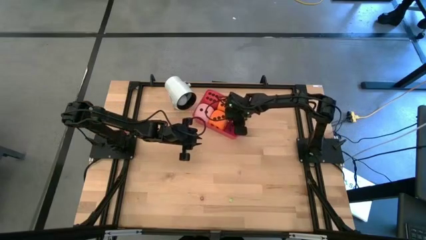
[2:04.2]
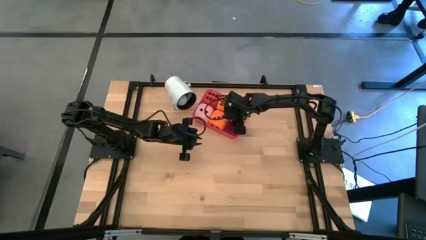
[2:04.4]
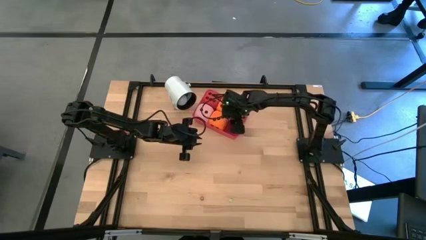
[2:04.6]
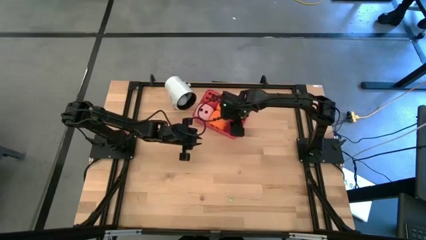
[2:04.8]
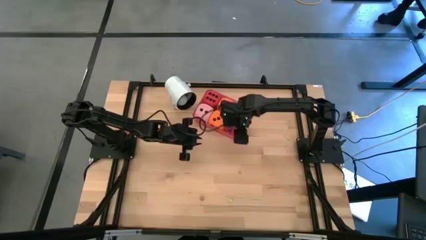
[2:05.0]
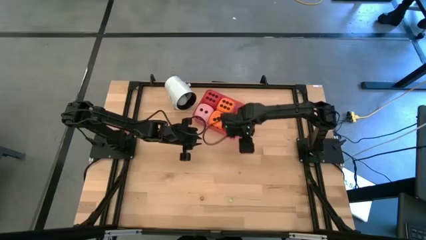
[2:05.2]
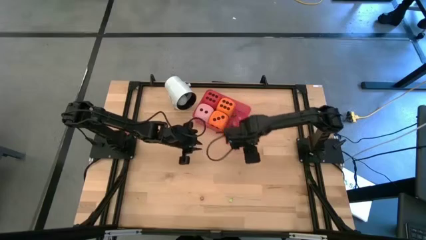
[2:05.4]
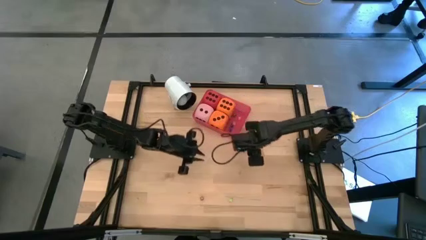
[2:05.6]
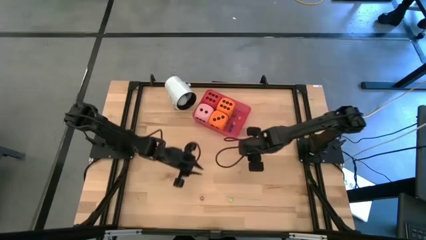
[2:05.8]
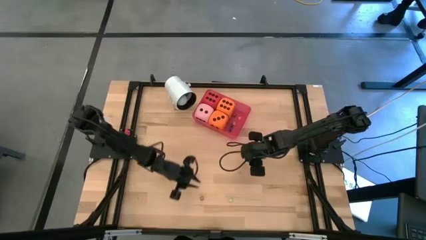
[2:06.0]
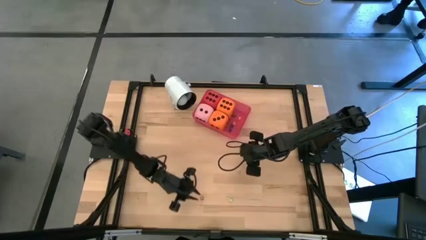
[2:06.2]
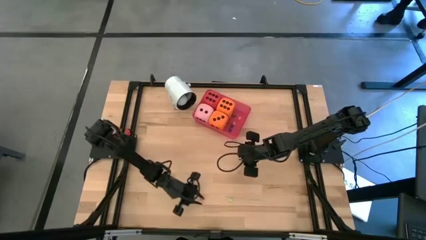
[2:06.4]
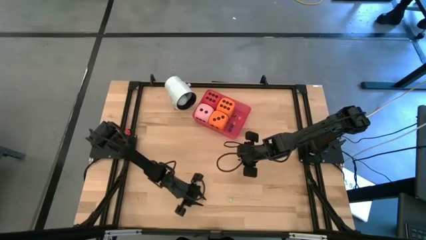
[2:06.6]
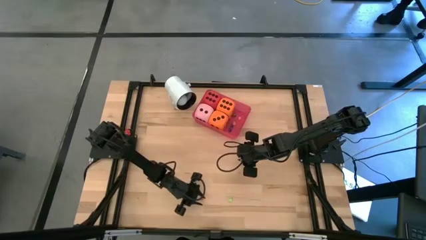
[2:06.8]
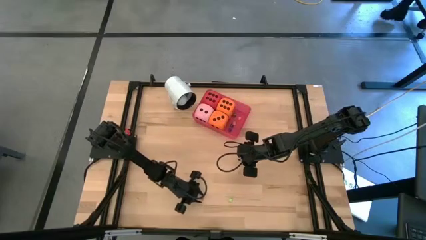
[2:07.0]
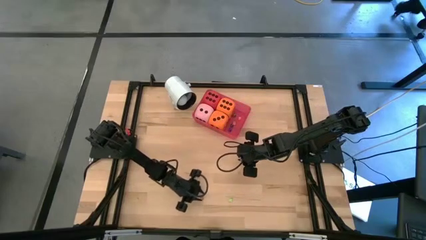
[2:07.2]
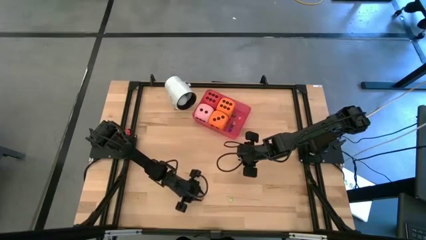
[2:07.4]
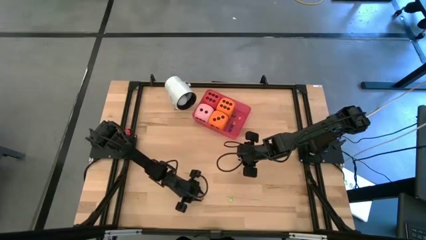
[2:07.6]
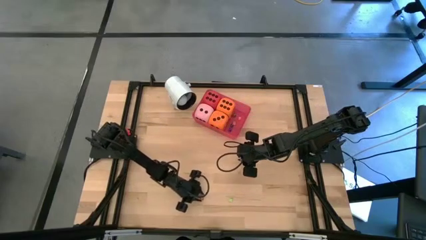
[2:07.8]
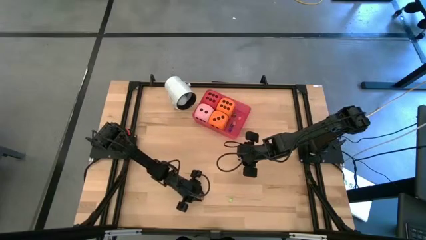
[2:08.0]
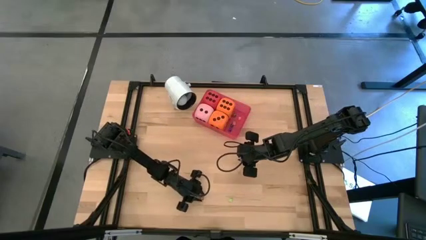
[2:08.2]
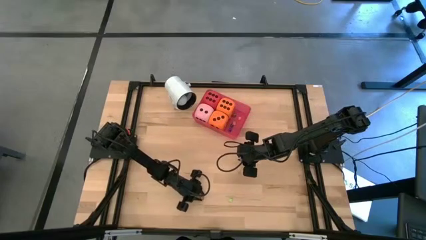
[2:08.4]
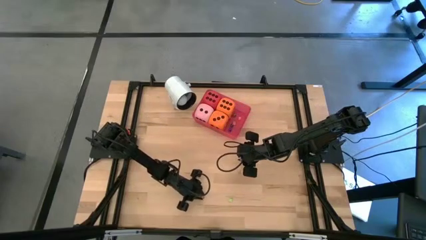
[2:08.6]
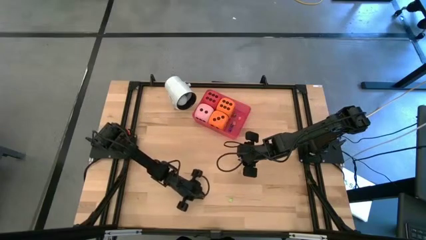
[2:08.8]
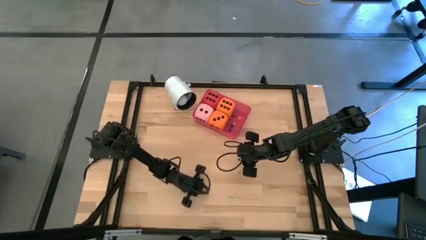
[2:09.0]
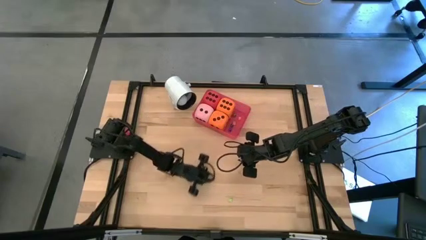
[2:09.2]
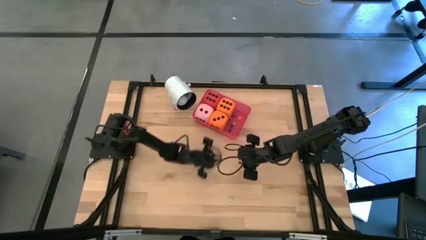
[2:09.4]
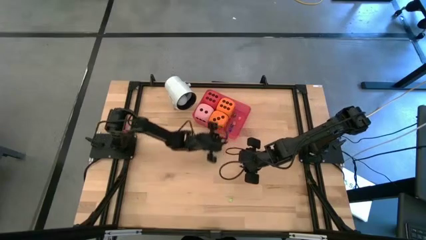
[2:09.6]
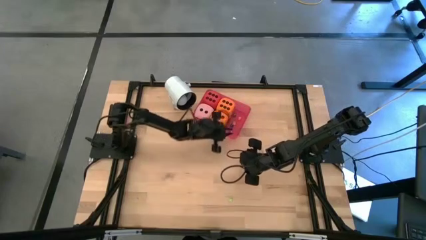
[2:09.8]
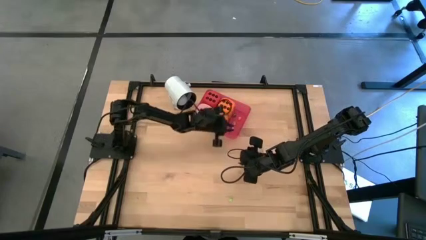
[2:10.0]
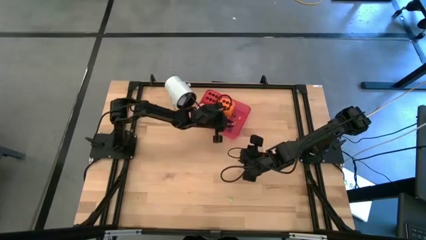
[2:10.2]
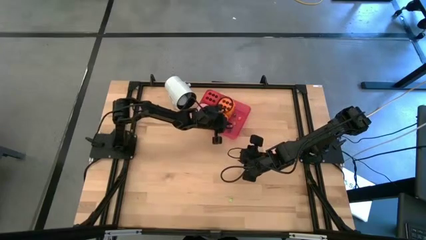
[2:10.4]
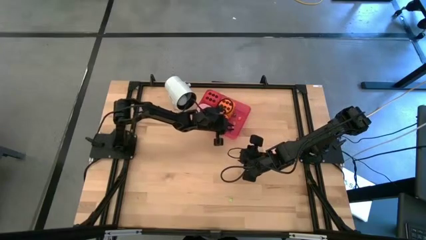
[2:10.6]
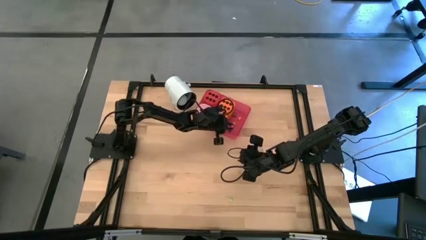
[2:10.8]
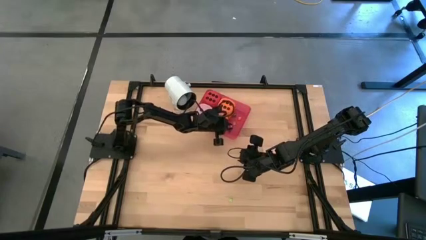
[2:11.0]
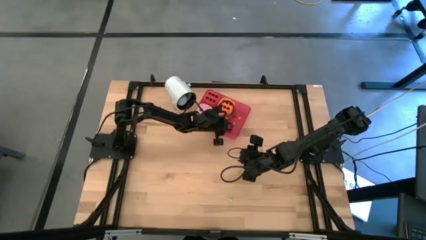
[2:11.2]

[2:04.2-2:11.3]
Task: Pick & Place Dice
Put the small red die into the red bin

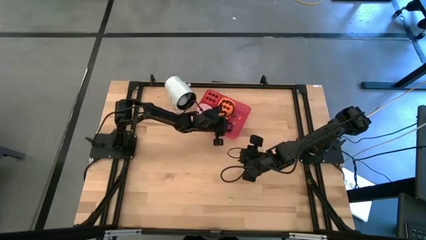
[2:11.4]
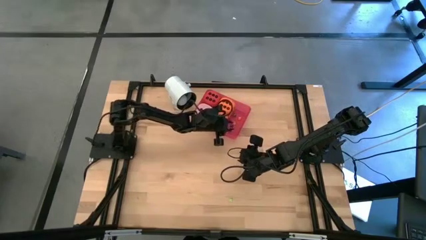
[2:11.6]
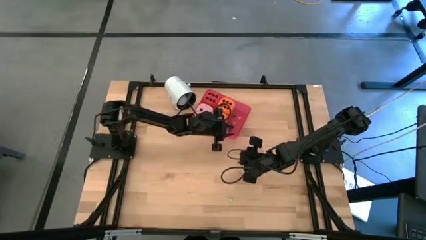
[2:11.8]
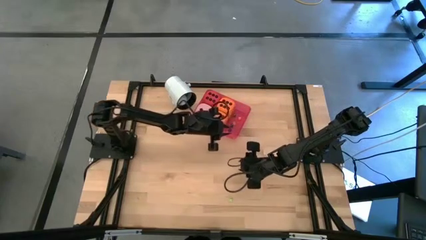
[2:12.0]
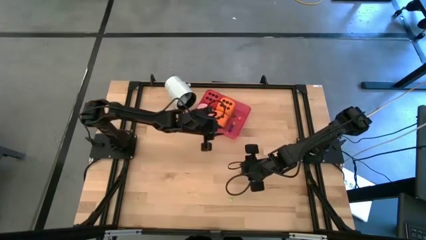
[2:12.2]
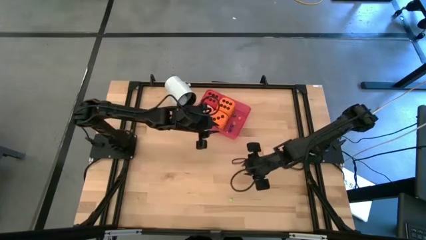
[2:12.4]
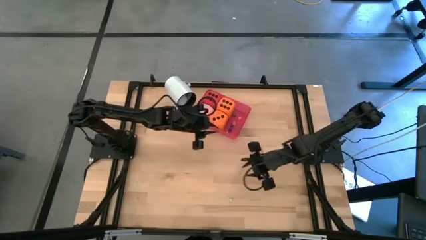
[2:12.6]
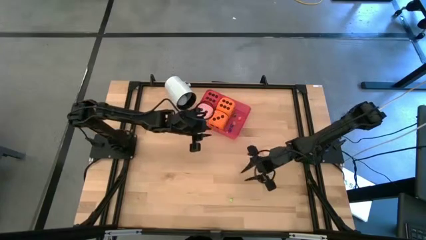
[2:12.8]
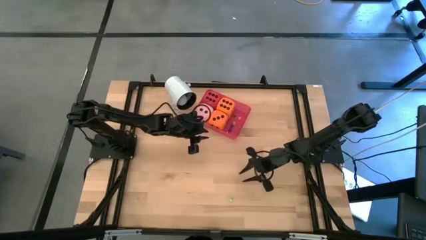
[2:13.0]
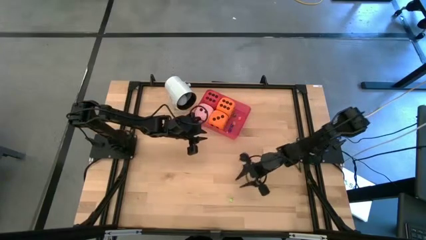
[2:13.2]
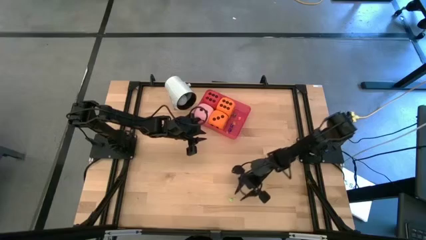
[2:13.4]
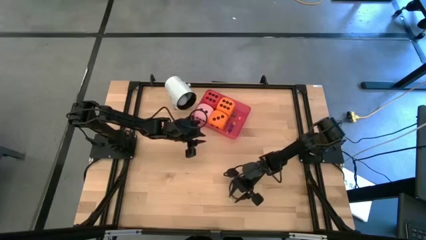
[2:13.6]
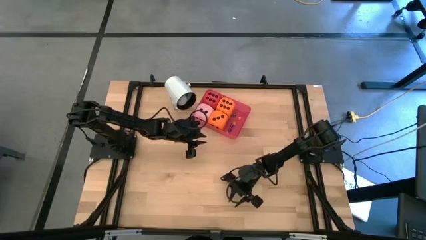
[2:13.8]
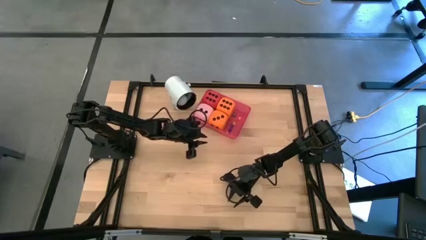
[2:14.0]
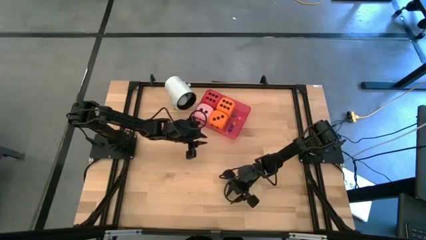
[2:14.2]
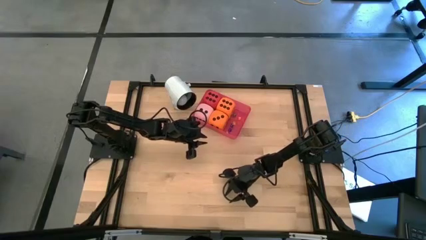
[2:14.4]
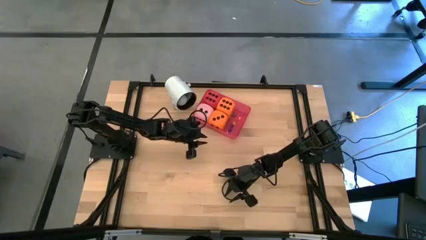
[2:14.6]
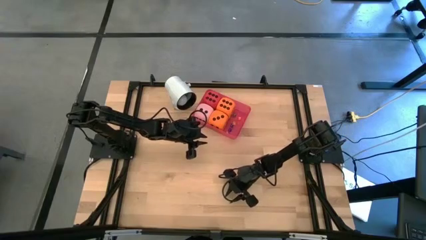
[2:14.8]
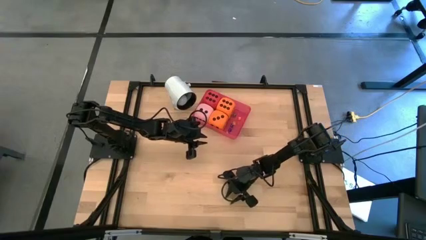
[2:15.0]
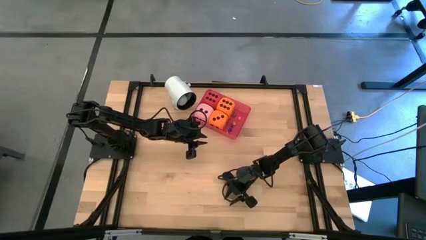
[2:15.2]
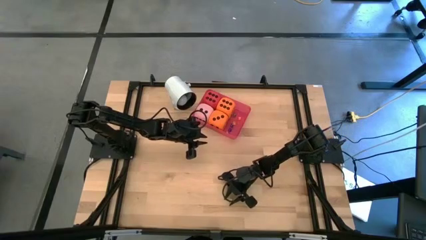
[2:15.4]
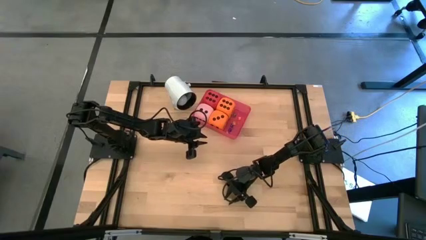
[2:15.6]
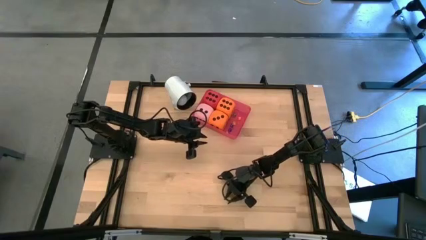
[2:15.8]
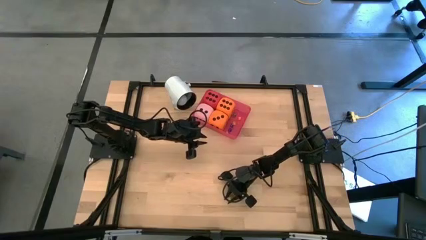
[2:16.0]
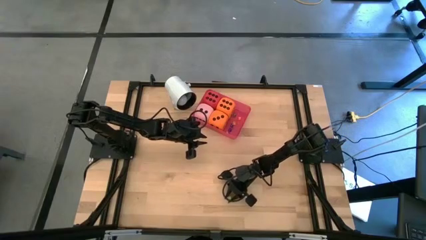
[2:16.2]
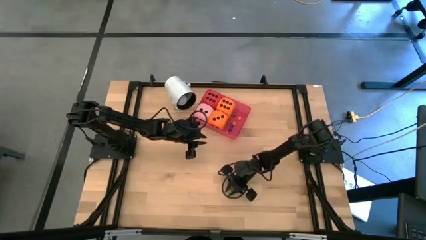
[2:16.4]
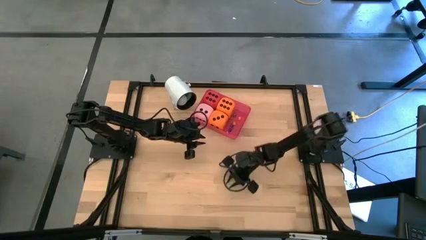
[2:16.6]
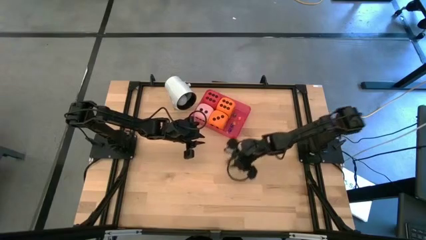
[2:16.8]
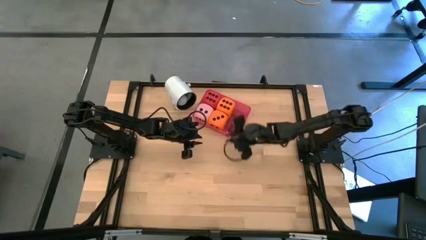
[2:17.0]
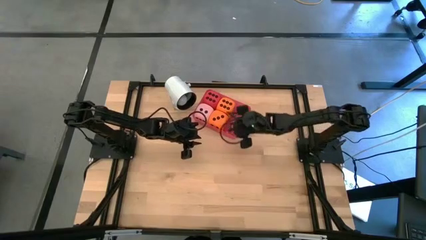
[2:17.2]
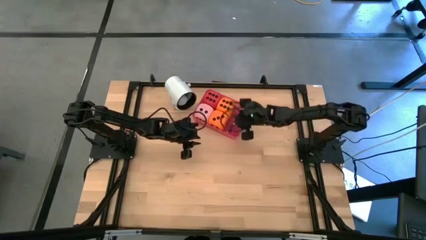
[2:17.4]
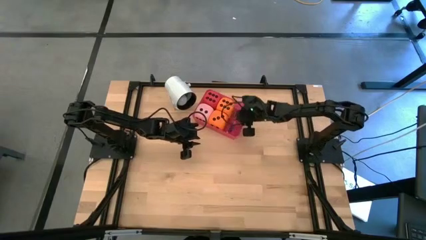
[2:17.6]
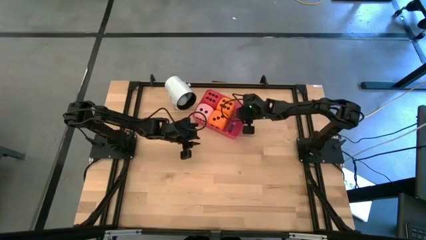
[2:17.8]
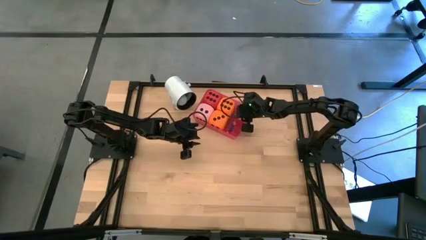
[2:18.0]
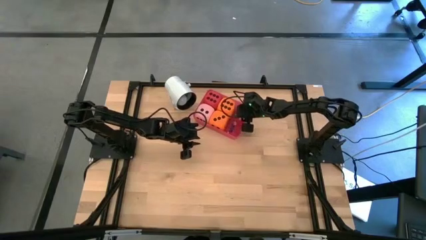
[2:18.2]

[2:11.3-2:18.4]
Put the small light green die into the red bin

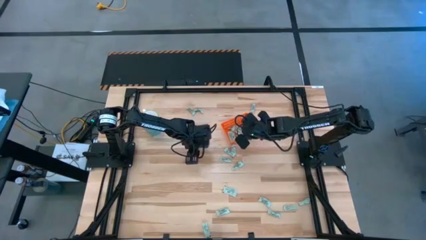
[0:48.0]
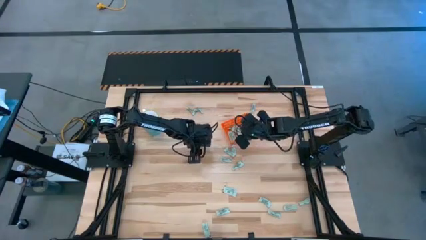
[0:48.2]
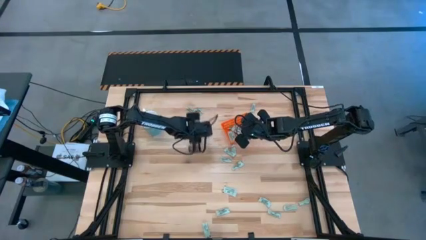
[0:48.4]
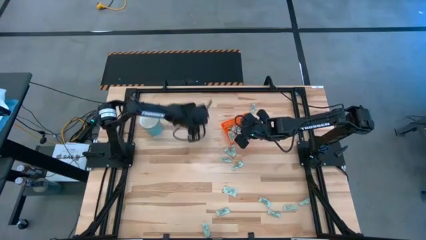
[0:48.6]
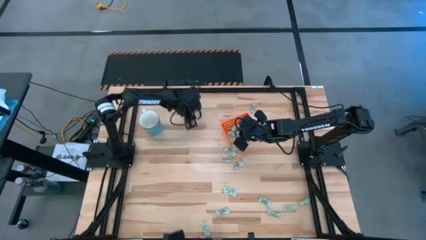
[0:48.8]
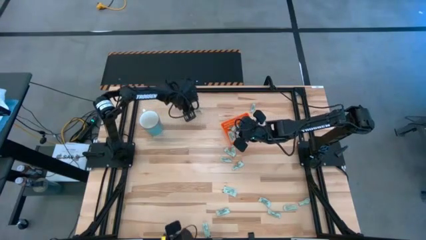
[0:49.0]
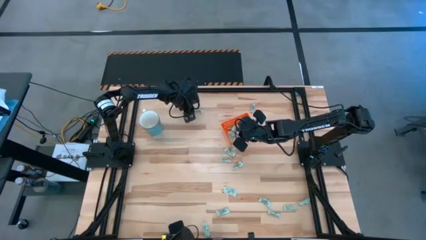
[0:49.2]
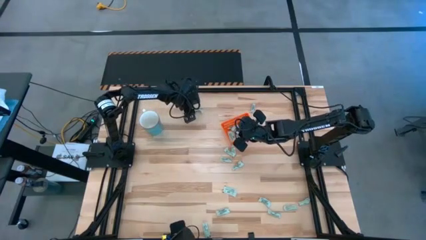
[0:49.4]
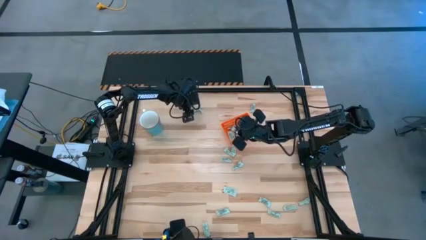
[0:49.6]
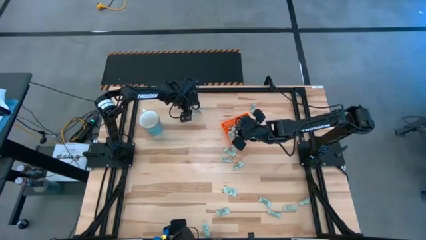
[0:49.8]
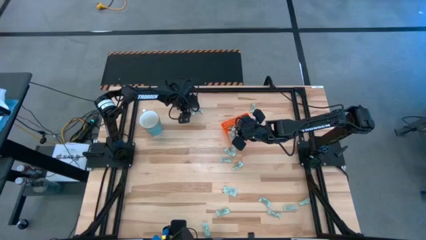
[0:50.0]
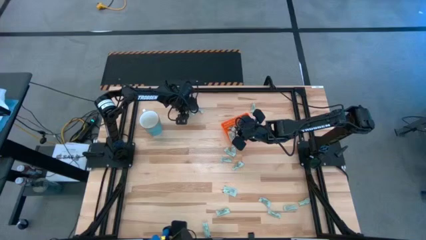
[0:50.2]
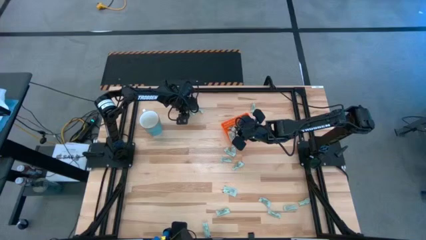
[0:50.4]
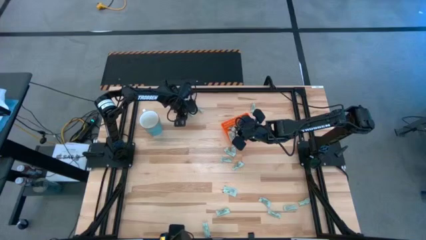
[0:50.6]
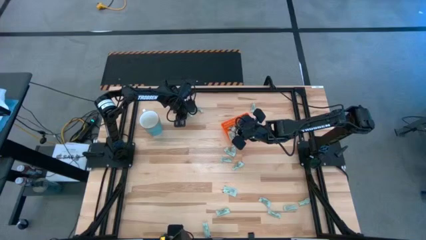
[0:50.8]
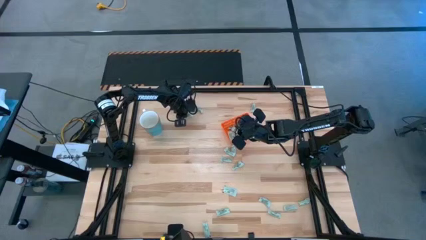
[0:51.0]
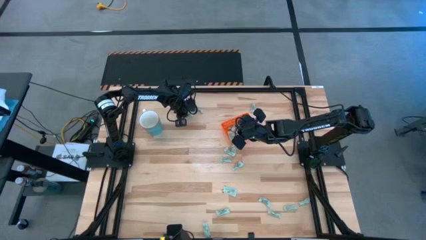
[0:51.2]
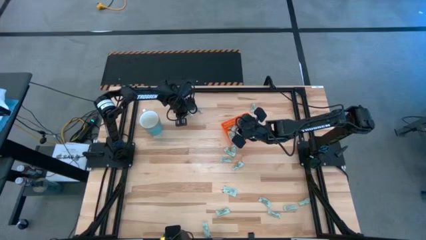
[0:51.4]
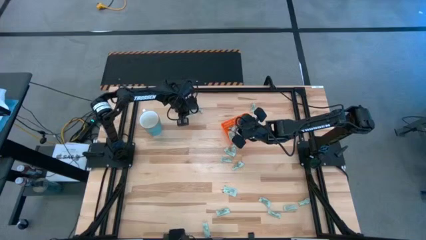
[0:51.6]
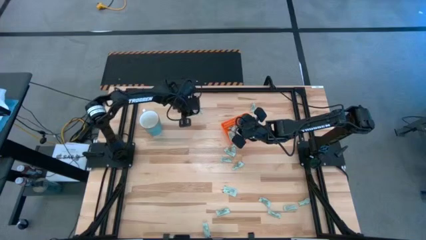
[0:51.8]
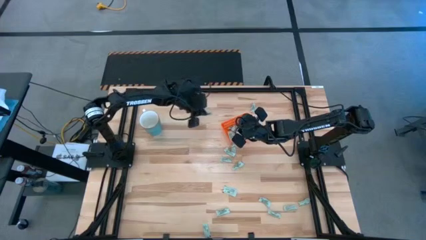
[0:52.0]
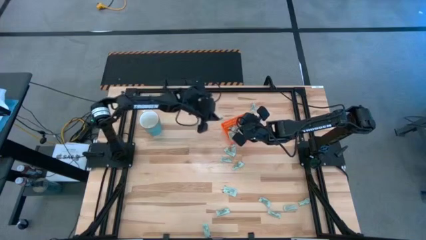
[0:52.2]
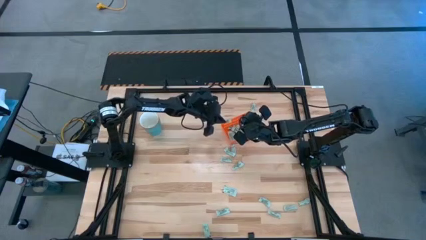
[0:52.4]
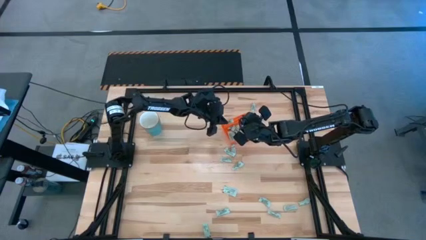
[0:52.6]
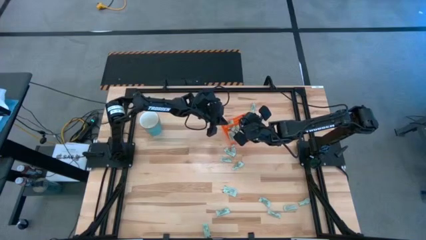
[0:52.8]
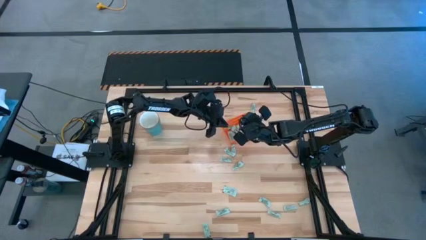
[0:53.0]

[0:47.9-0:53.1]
Task: Pick and place Stevia / Truvia into bins
Put the stevia packet into the bin
